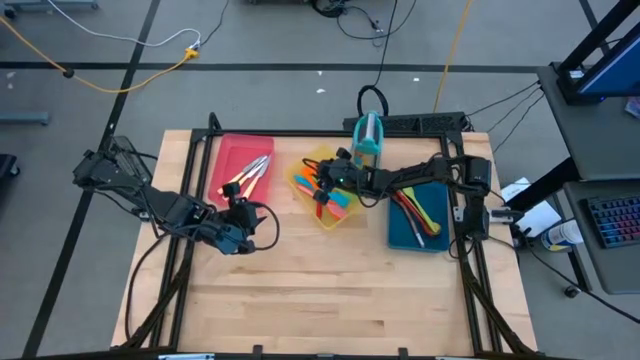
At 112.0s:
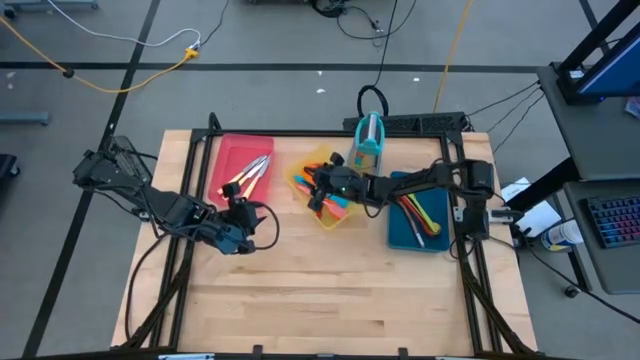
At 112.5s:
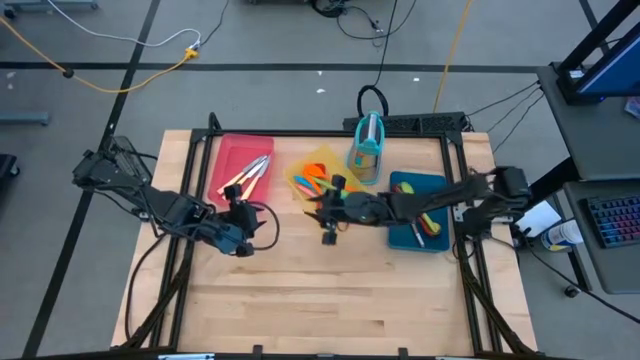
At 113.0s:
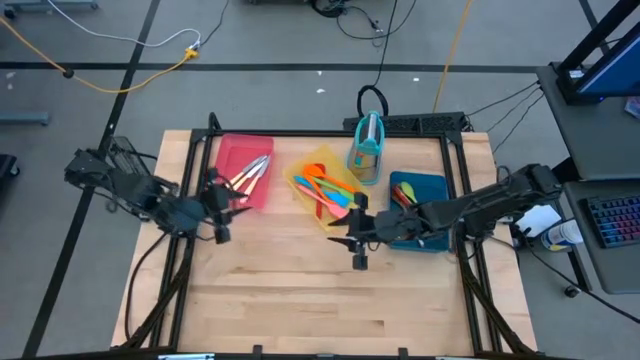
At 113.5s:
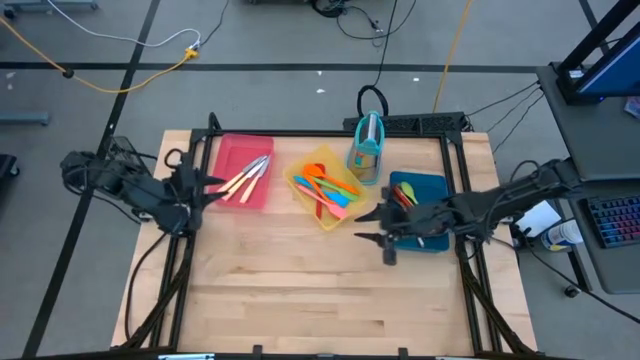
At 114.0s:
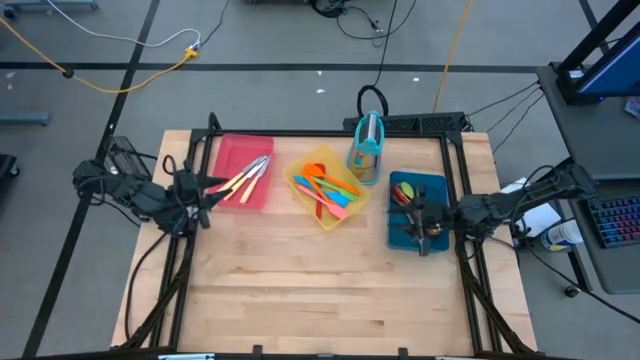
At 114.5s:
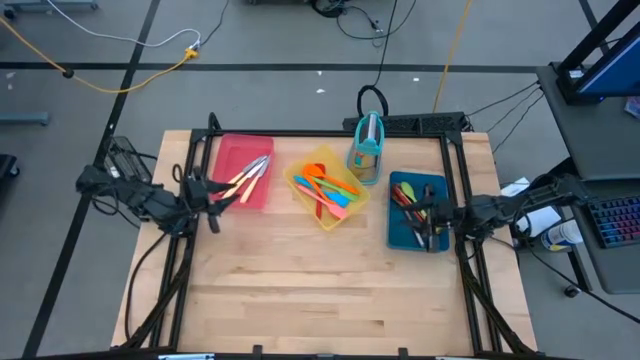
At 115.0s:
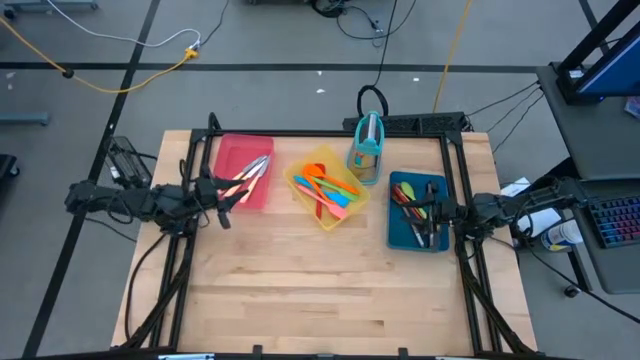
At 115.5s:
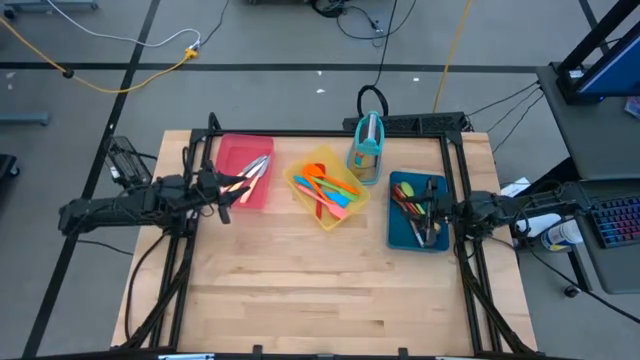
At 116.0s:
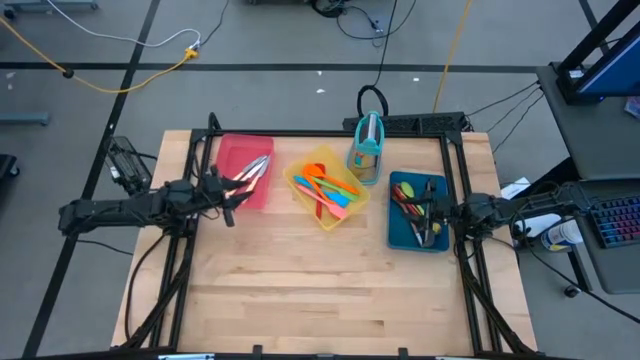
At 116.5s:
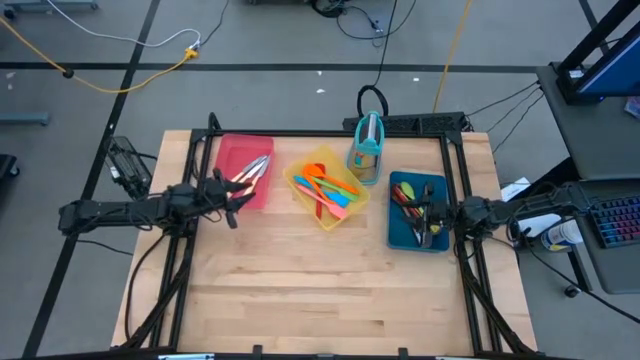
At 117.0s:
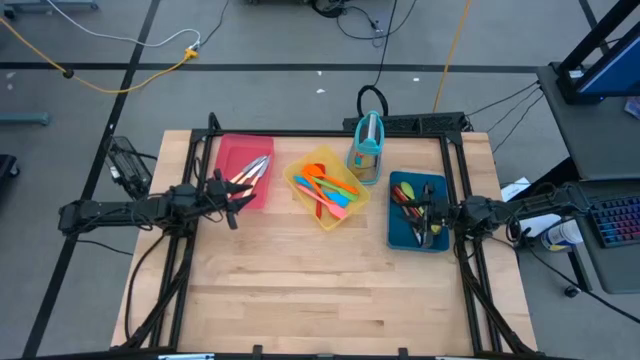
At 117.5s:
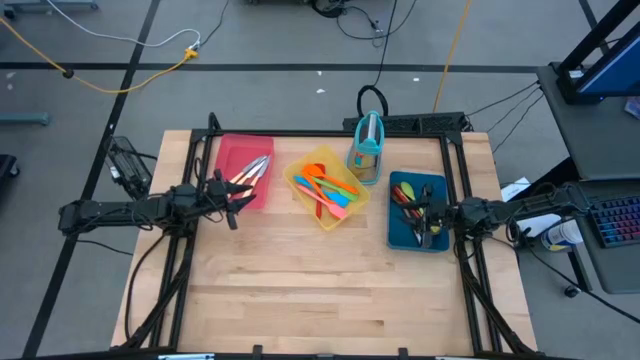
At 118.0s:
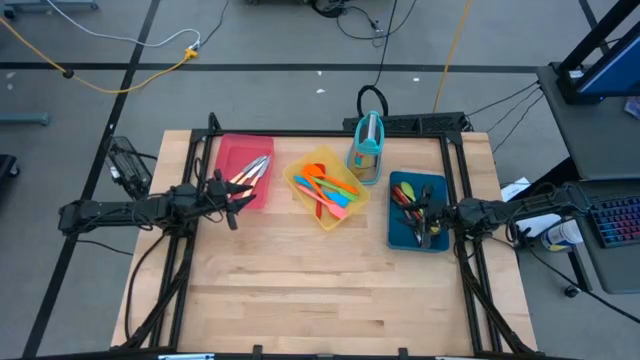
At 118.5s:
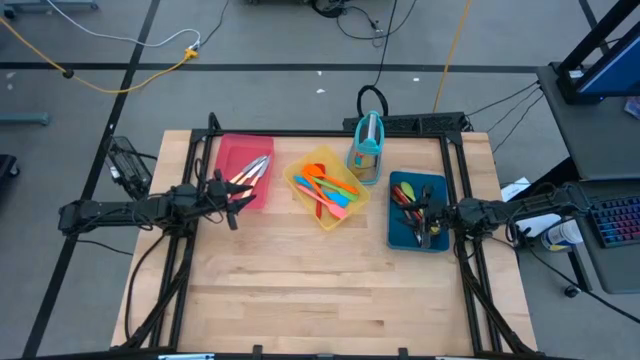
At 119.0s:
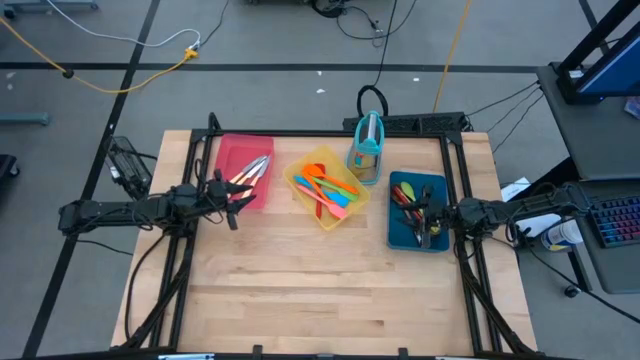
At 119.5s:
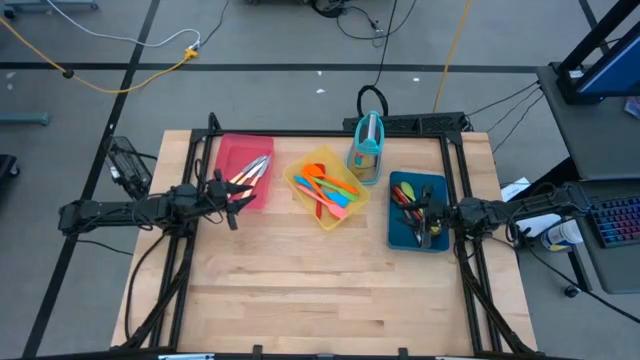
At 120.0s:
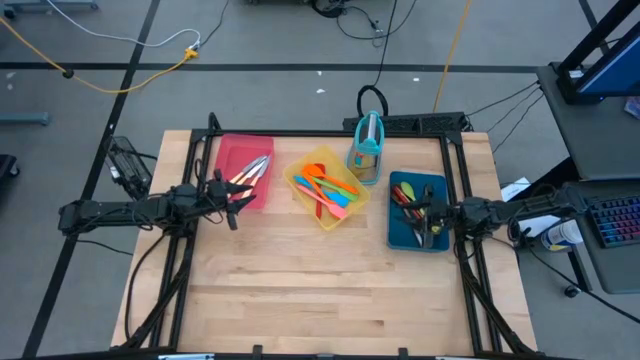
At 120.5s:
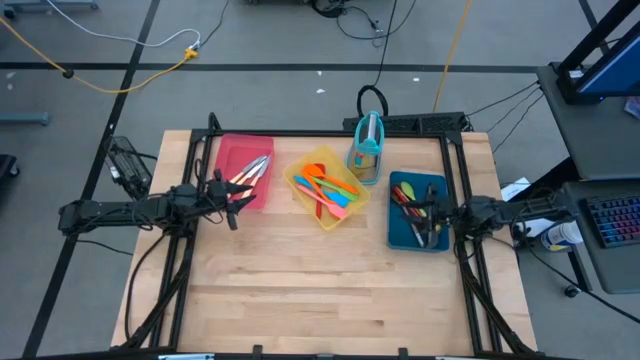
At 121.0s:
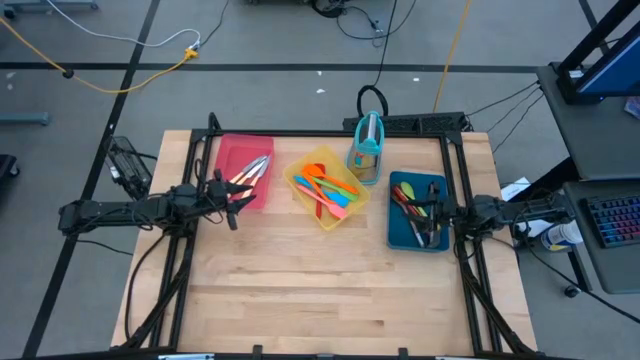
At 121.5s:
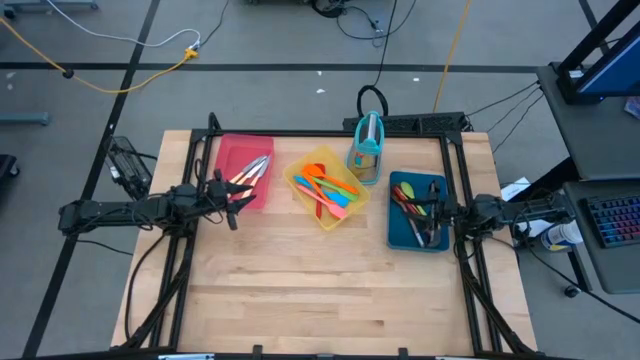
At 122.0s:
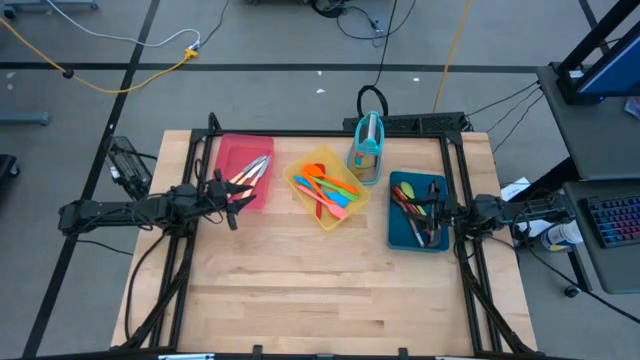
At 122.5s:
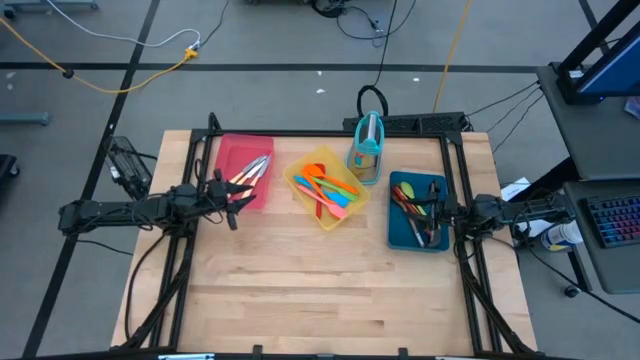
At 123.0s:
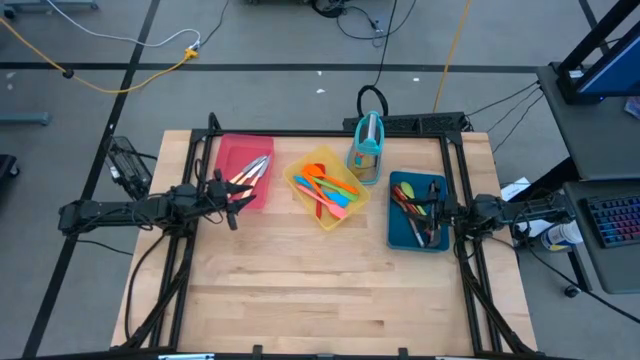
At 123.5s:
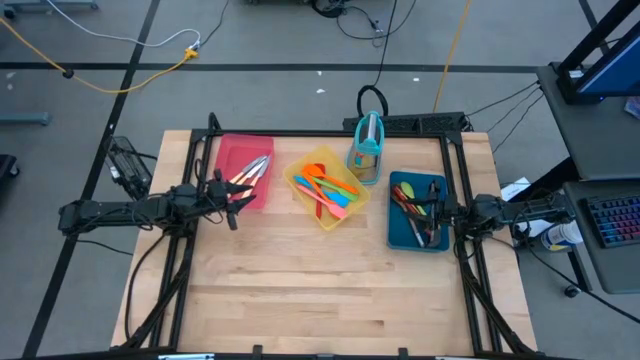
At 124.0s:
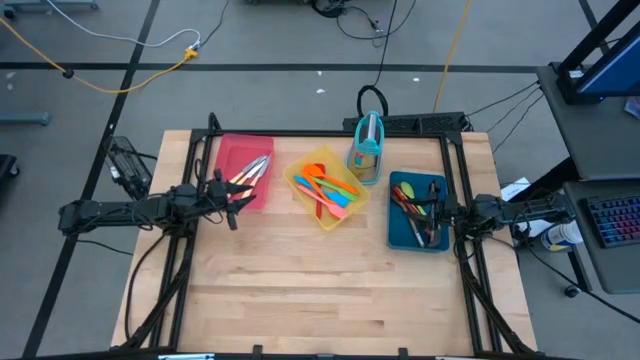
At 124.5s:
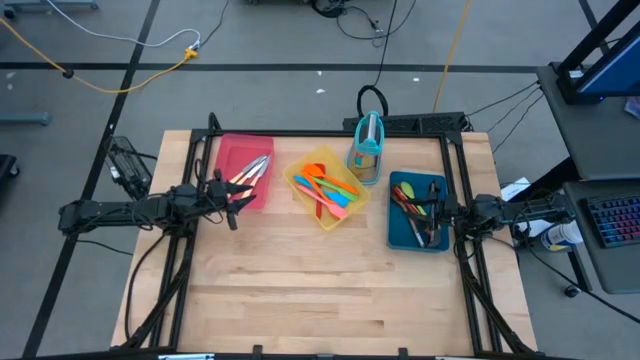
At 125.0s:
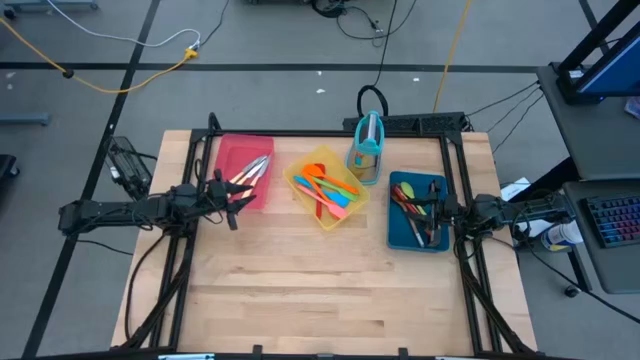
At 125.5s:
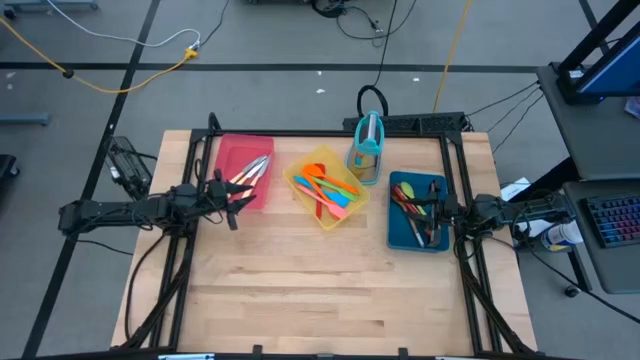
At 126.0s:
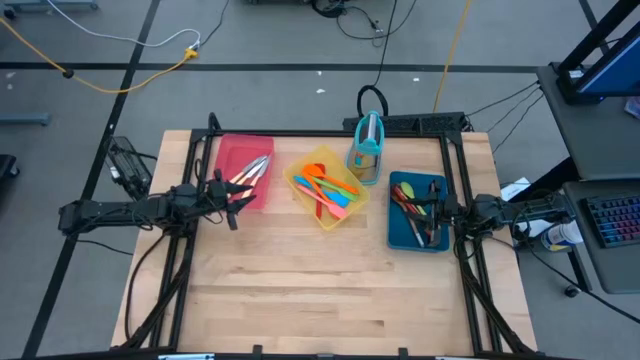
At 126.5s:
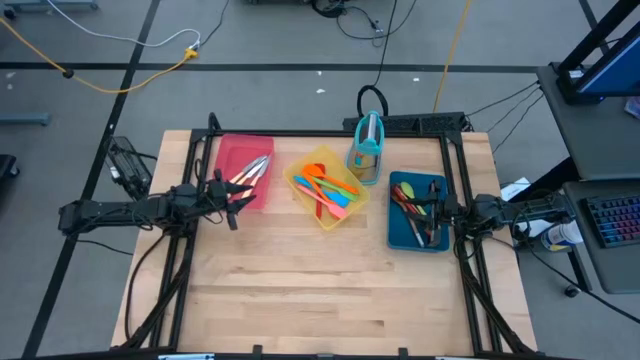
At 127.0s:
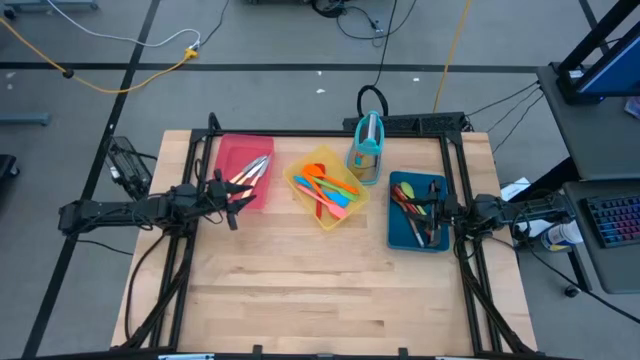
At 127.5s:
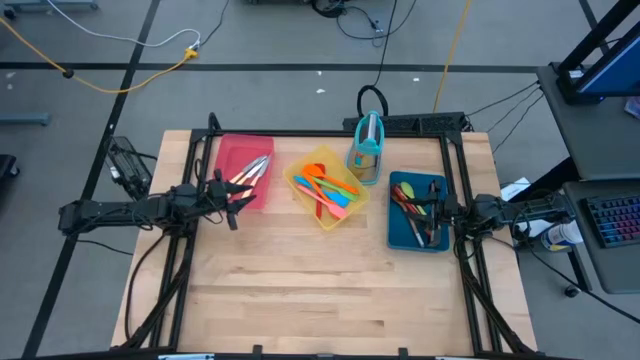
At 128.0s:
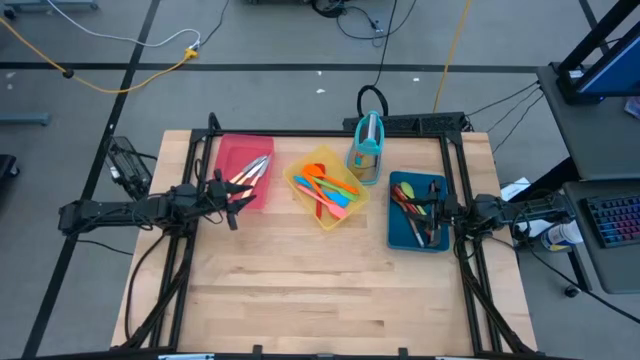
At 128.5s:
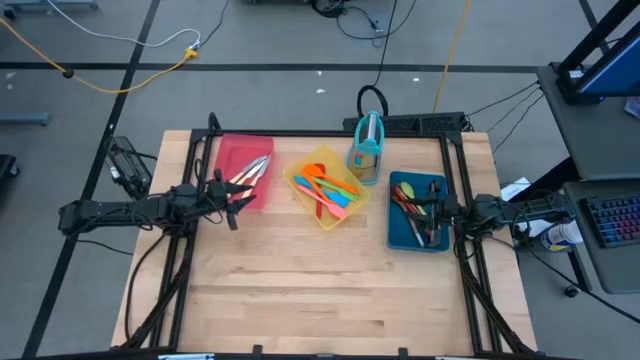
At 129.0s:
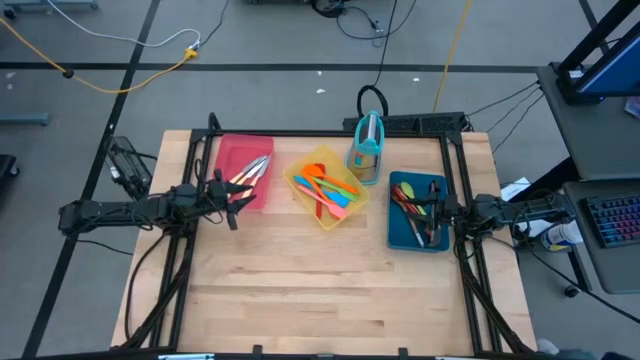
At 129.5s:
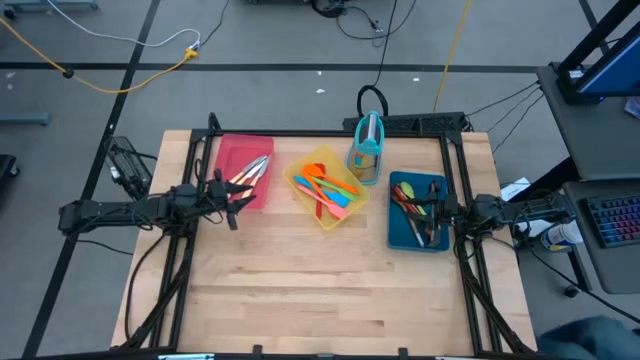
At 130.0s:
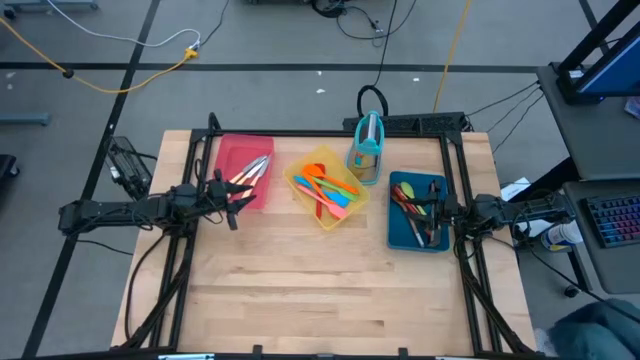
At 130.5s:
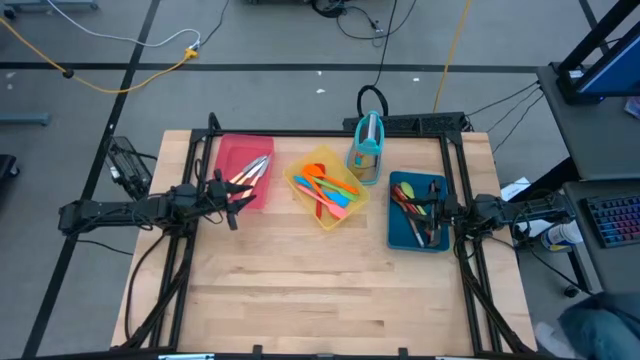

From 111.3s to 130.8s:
Task: Pick & Place Kitchen Items
Return to Home Position

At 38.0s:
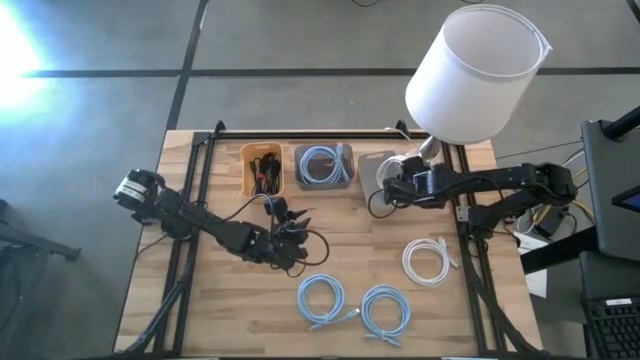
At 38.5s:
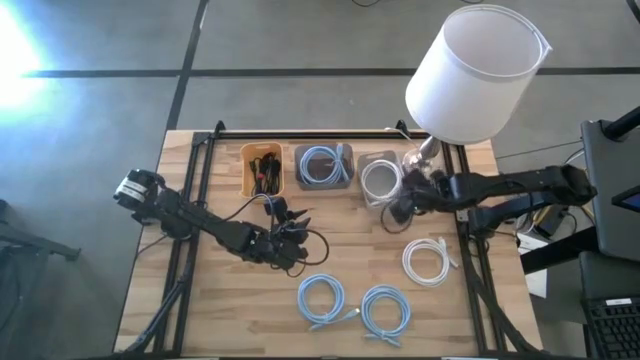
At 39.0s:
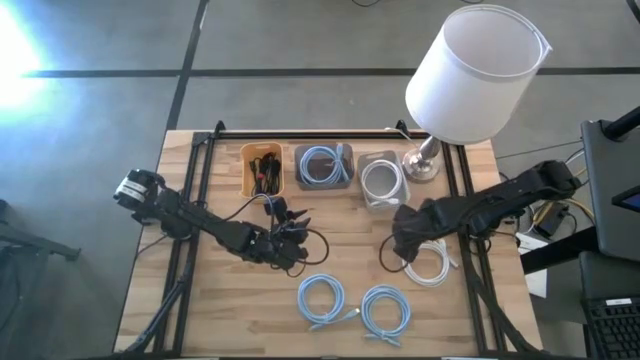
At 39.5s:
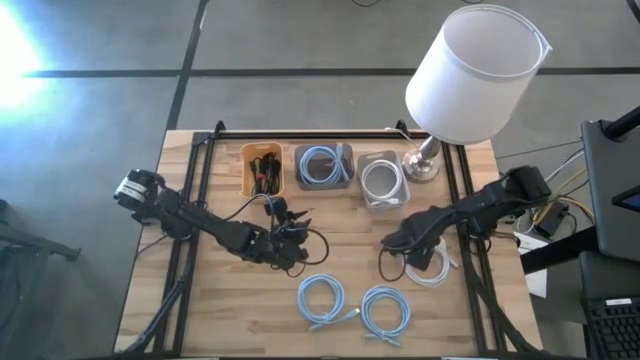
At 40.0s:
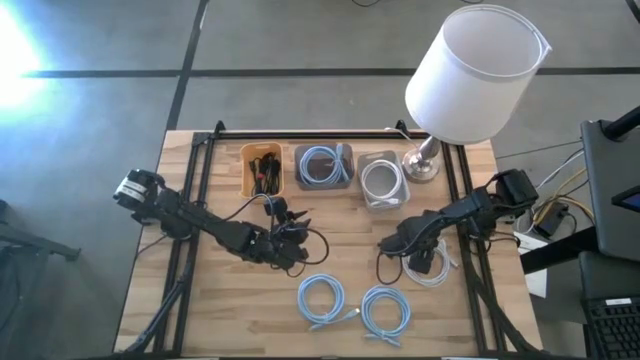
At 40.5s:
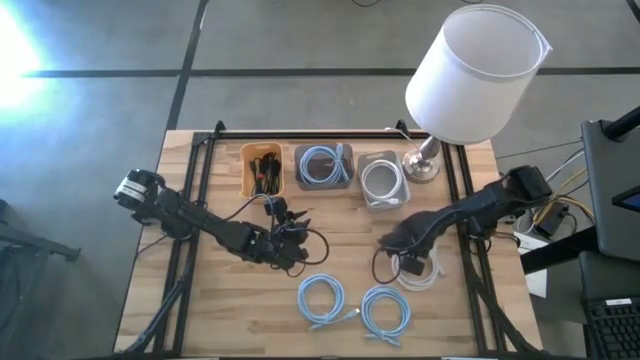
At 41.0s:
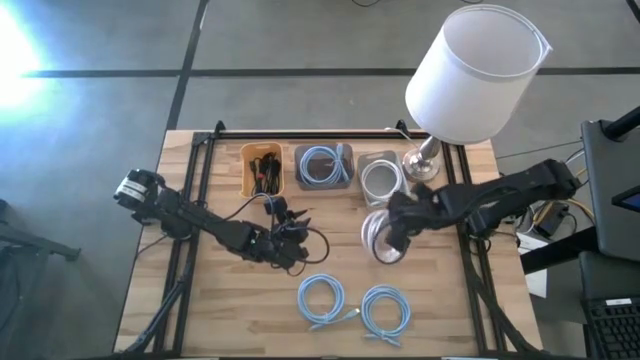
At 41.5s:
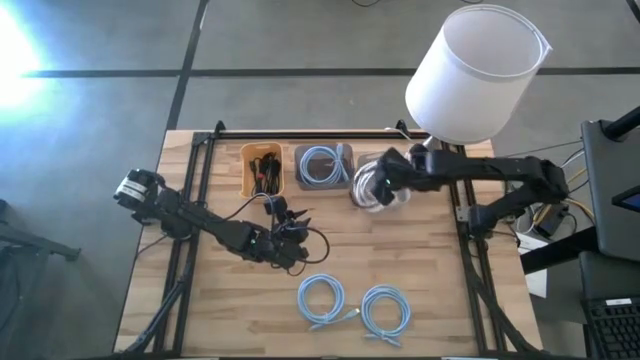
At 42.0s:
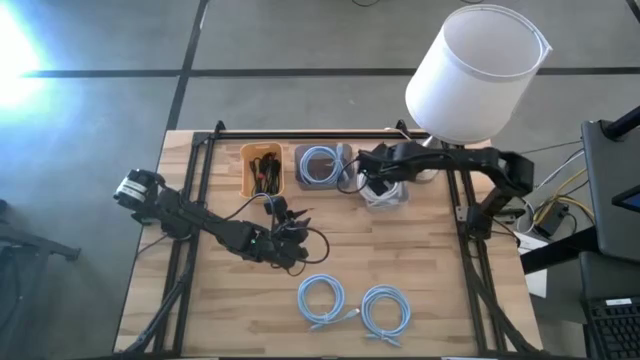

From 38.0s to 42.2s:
Task: Pick & Place USB Port
Put the white charger cable into the gray bin
